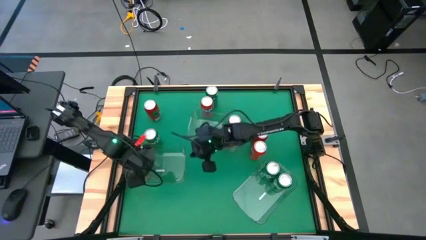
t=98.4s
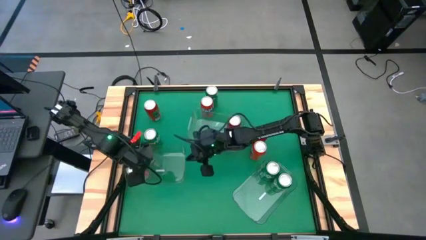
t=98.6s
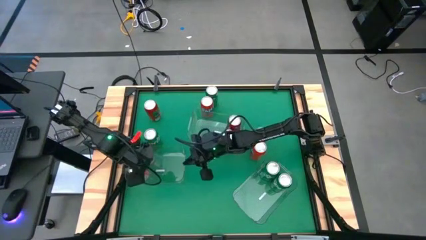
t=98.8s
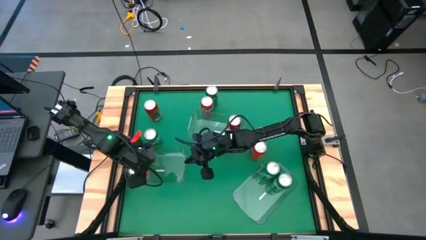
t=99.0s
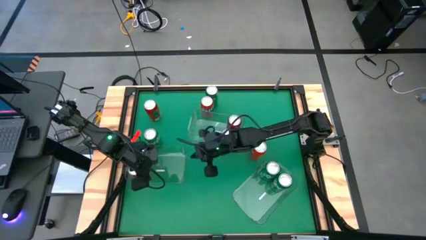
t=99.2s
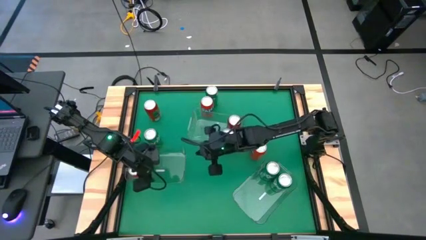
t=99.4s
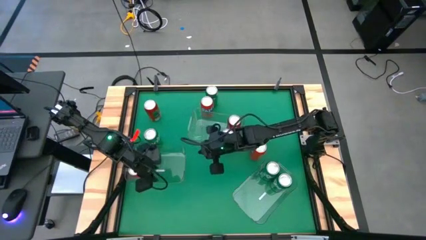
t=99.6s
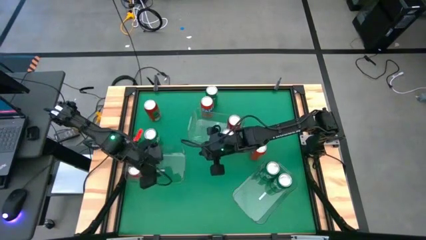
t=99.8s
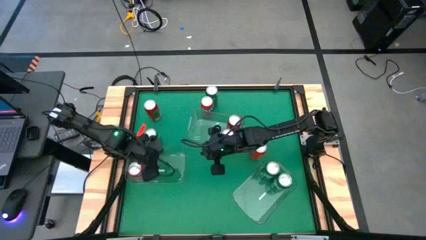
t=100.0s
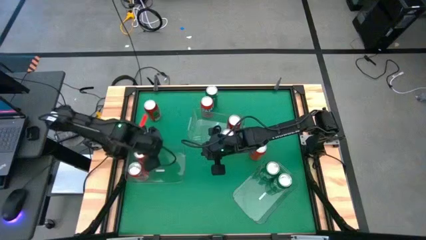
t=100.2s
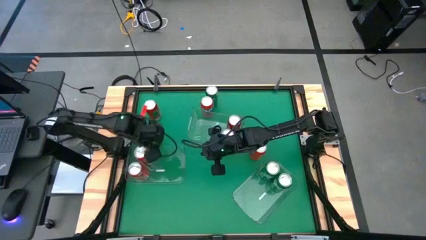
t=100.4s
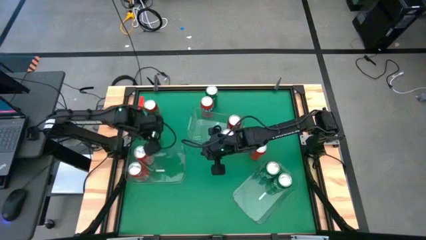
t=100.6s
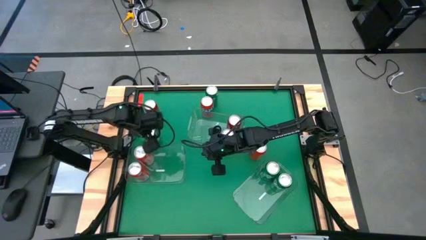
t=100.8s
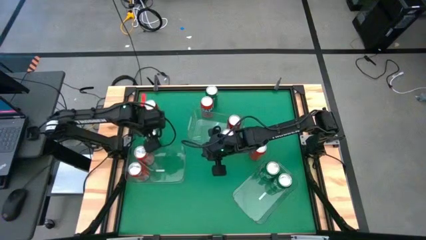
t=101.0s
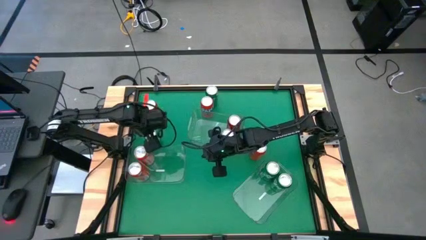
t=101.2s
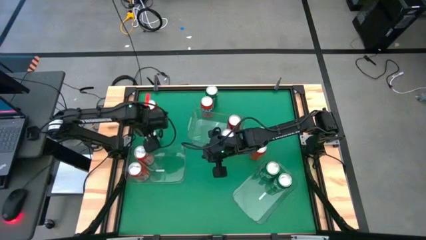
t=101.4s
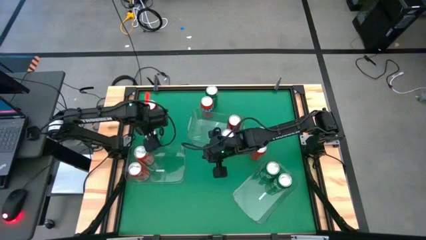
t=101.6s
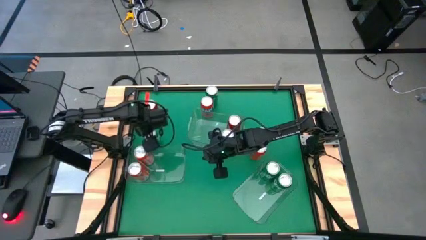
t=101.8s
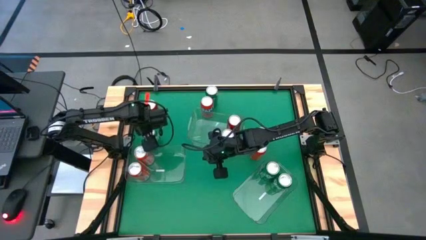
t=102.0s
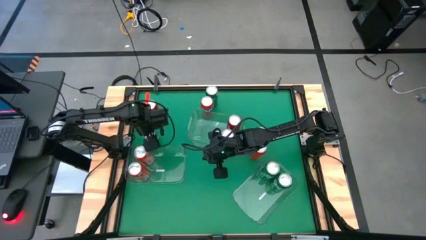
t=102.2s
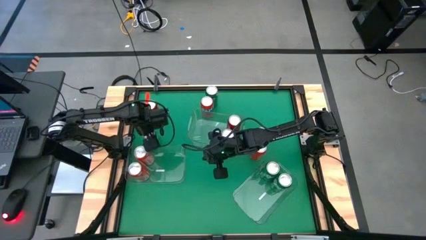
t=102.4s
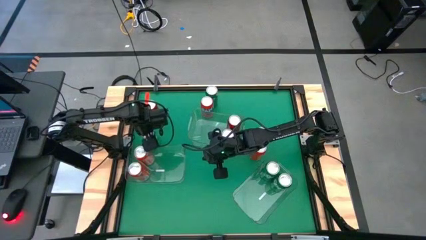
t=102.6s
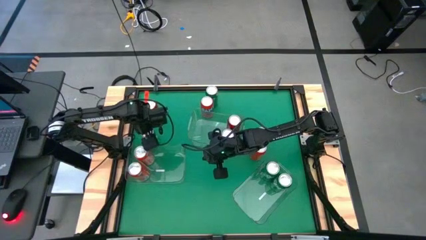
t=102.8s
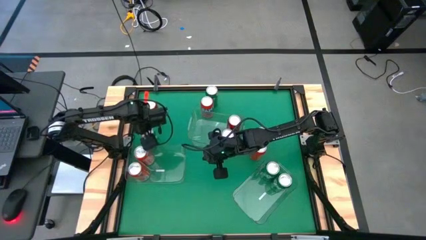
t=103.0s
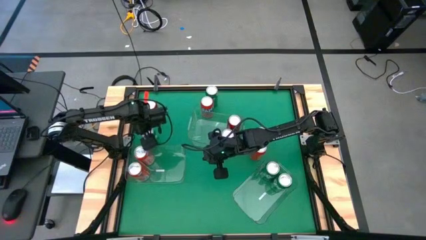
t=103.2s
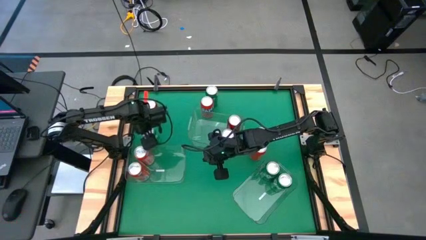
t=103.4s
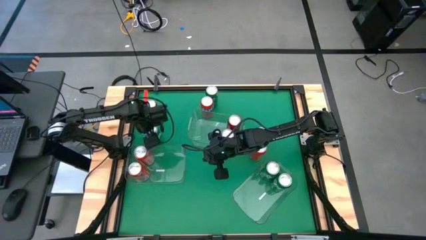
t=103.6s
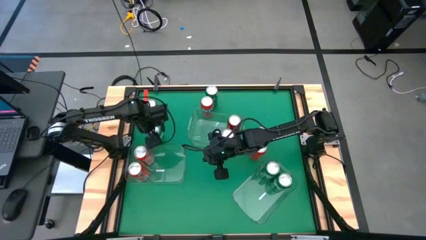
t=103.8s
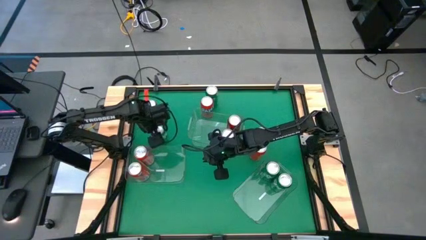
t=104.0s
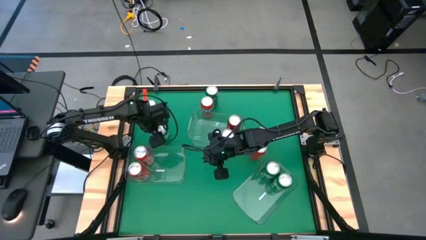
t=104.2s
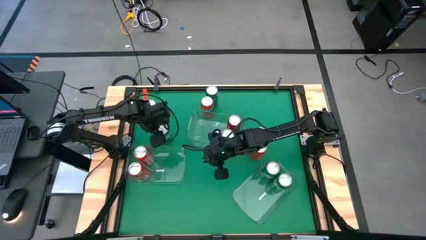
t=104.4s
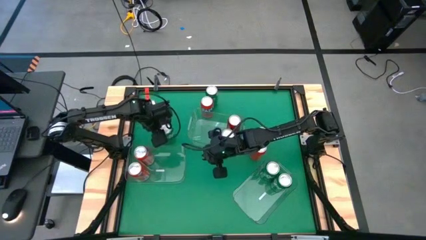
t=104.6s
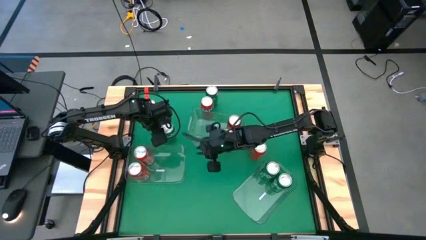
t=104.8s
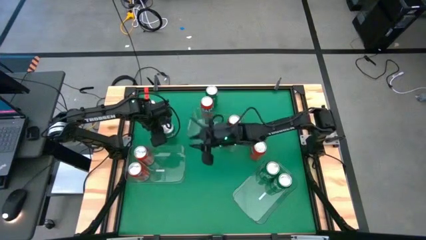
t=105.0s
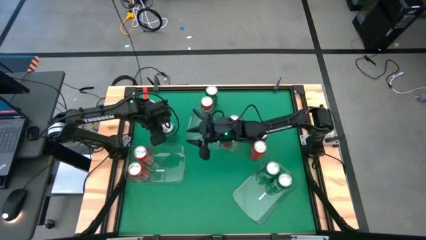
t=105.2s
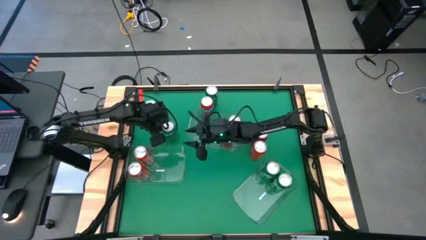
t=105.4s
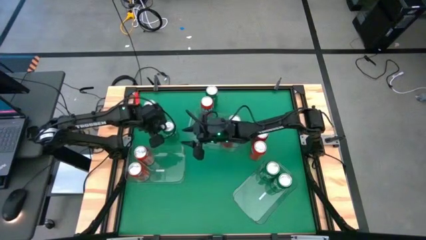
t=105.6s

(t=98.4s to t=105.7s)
Task: Sort soda cans
Put the bottom green soda can into the bottom right transparent bin

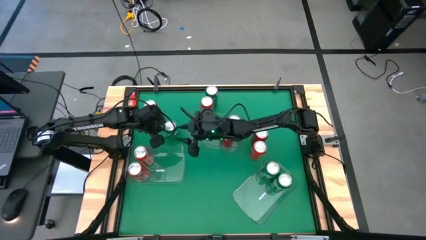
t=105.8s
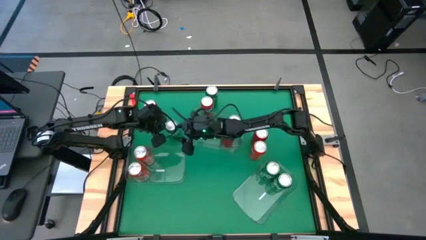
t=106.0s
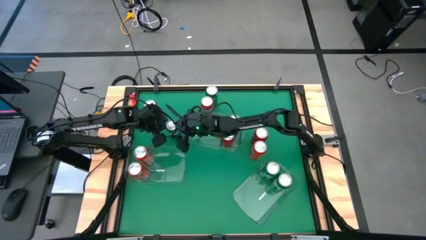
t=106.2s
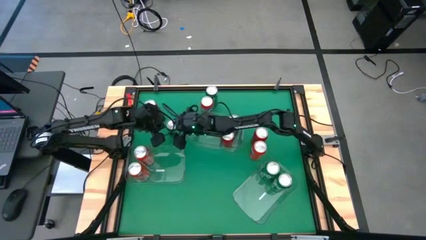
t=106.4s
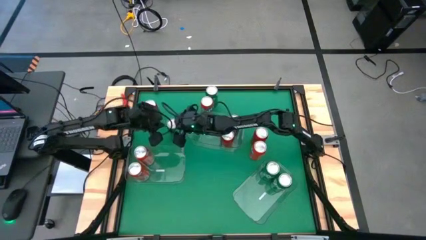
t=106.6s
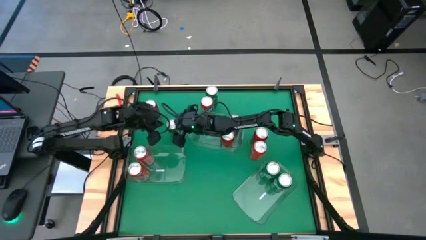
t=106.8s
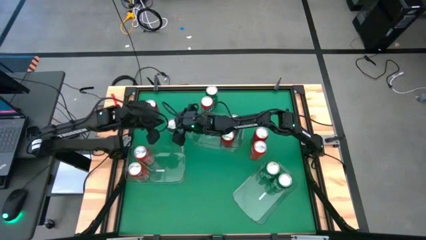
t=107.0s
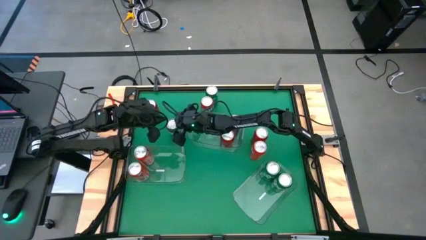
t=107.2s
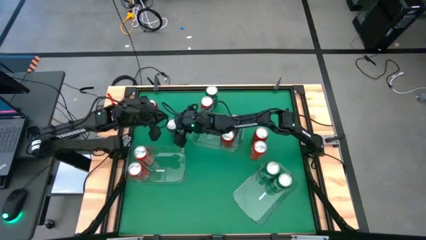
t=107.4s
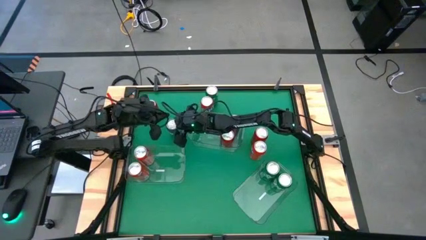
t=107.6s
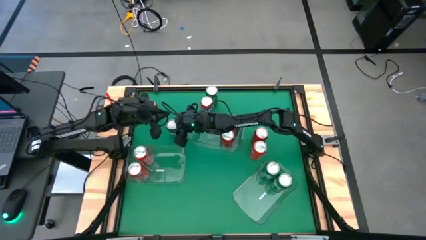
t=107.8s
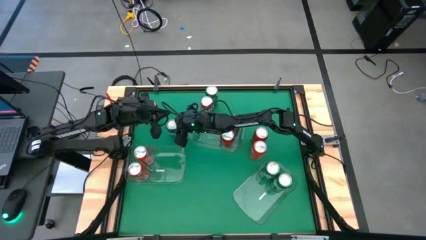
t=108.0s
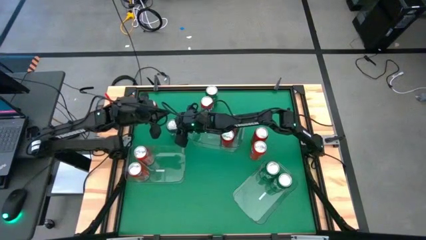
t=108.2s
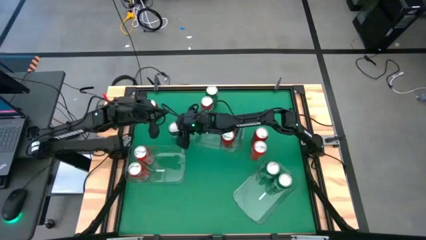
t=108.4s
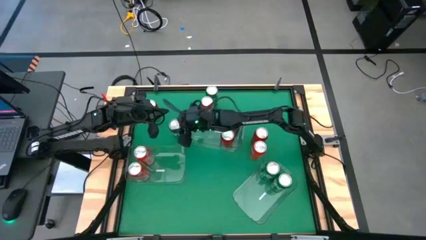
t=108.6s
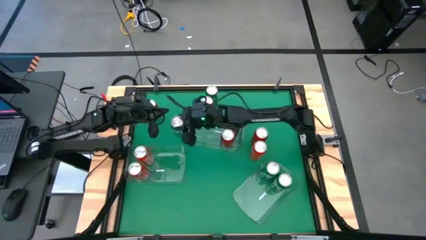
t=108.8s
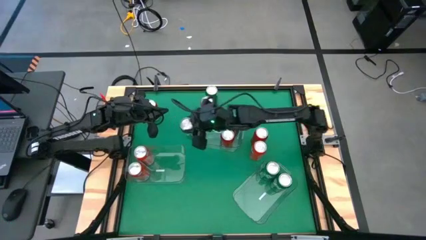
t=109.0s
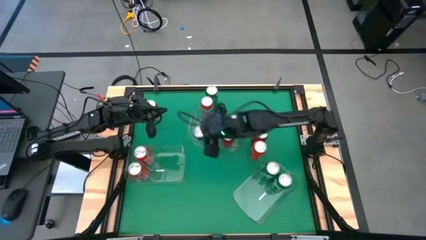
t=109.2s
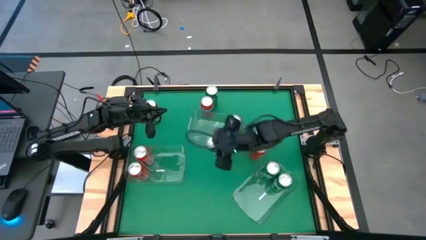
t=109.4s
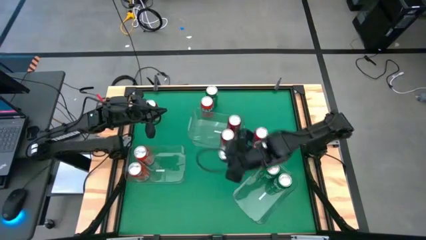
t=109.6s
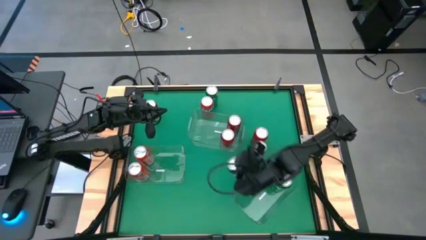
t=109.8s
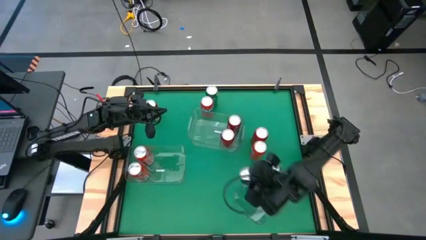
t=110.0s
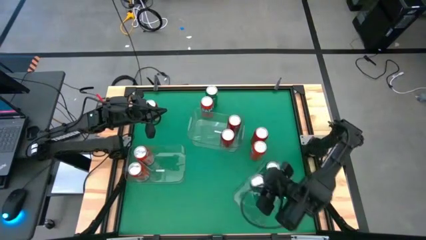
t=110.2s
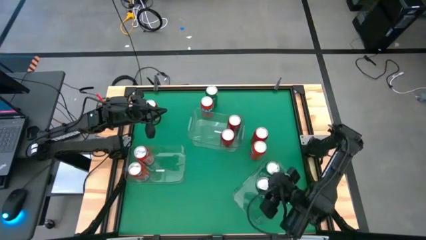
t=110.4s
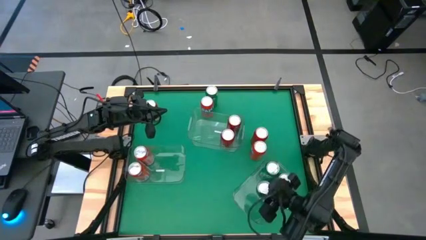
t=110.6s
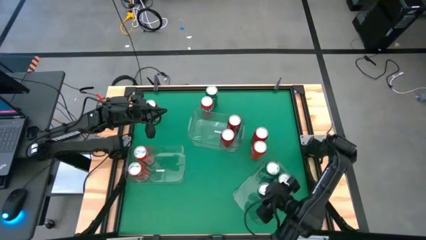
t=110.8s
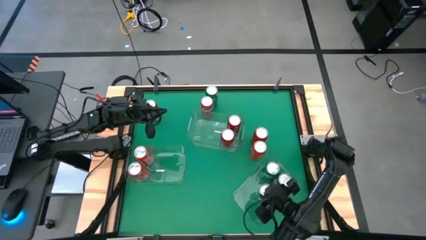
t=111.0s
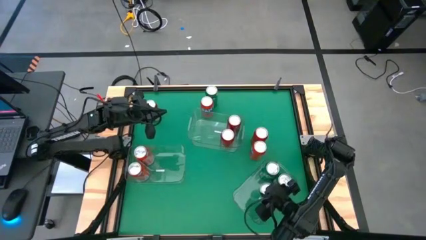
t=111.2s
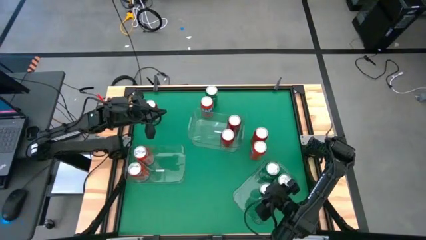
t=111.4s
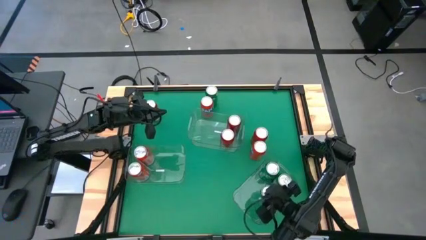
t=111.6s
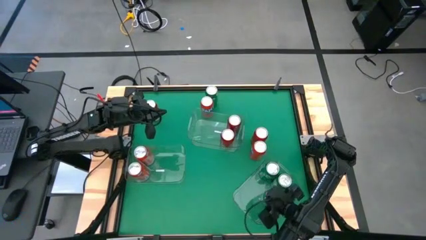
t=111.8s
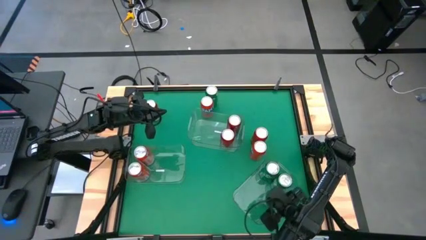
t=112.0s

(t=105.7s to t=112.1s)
Put the bottom green soda can into the bottom right transparent bin

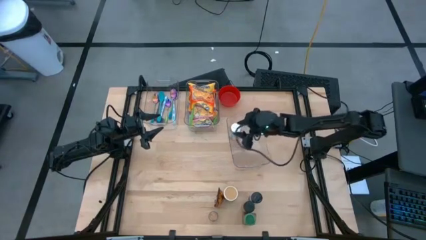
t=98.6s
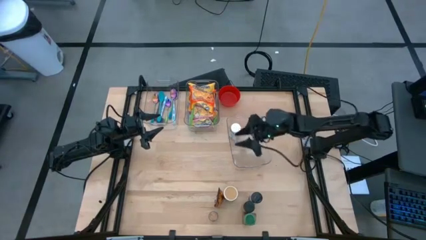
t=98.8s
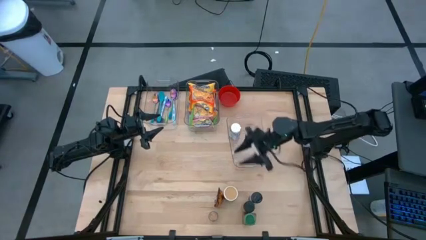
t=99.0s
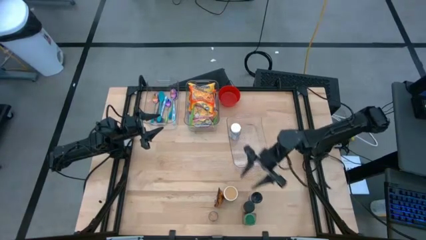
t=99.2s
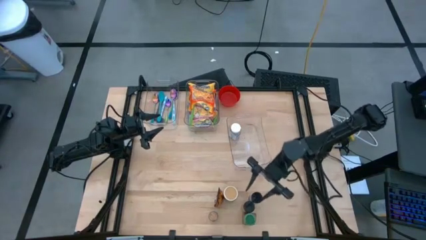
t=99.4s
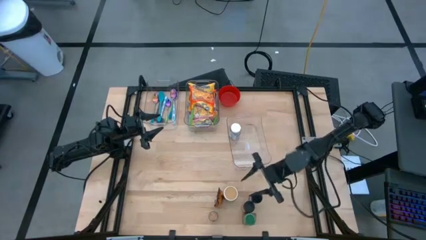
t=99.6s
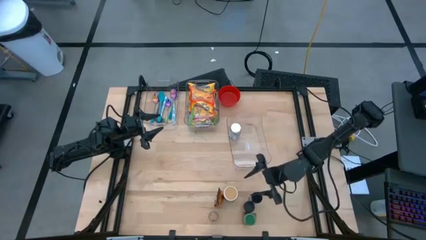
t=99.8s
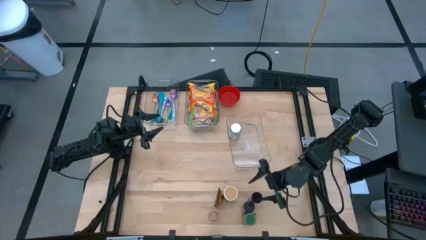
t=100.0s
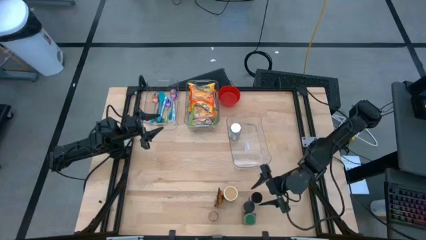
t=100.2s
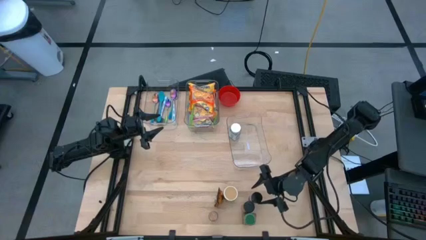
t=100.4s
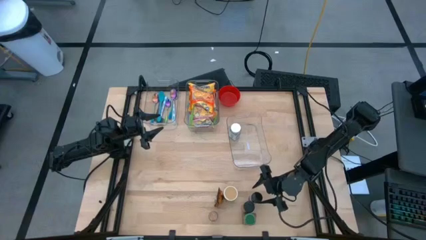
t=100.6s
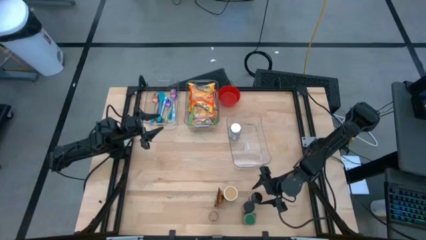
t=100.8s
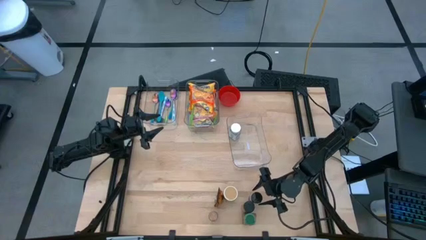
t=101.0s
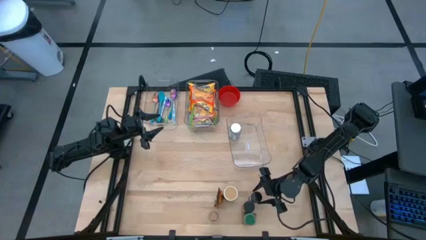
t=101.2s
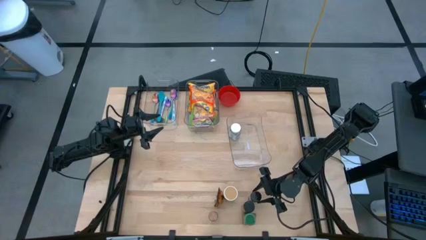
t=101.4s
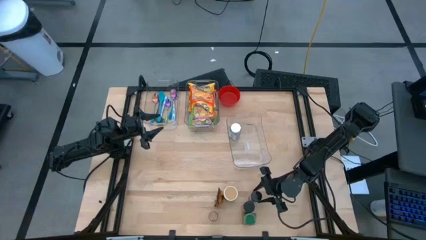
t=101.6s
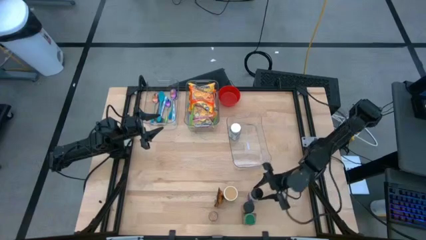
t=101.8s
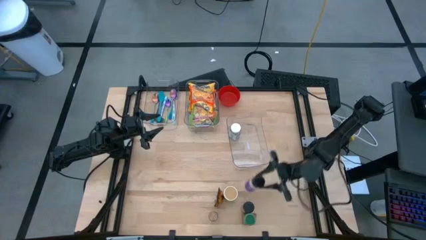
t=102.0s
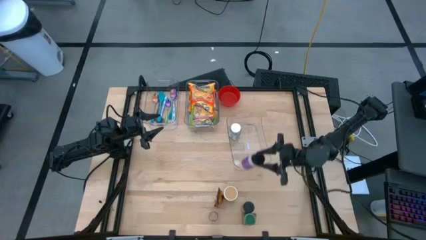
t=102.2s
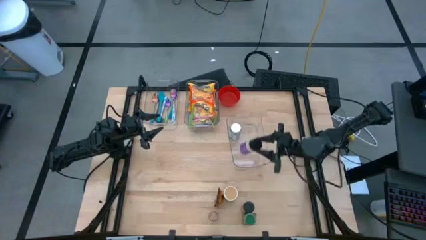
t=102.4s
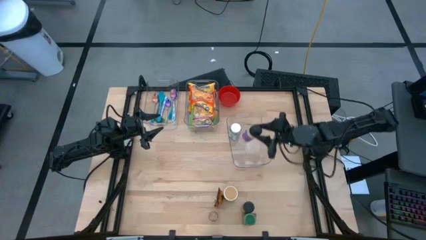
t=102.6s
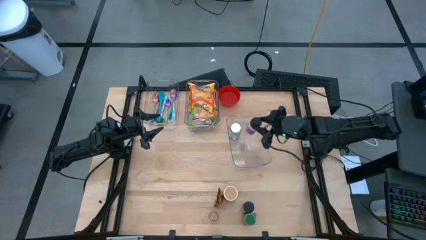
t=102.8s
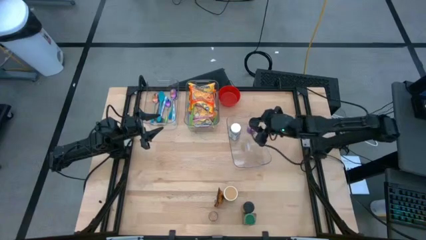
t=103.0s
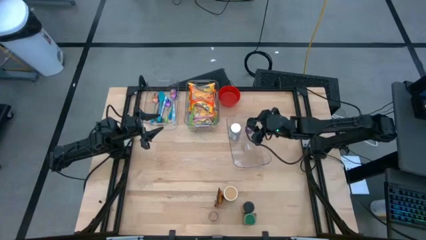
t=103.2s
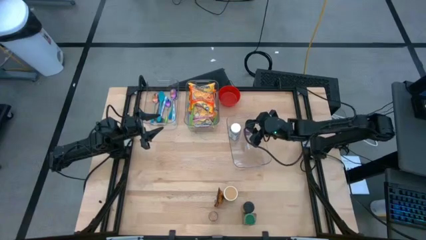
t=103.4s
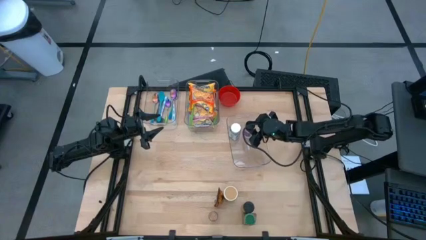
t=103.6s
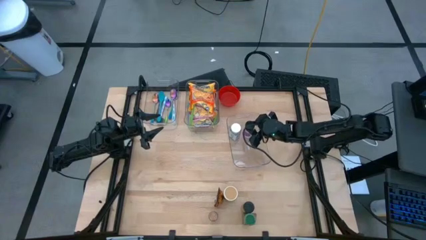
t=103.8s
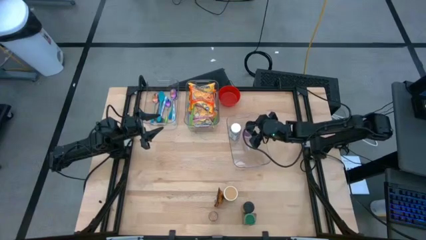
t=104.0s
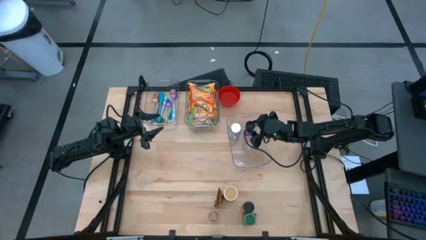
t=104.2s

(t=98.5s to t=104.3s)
Task: Pick & Place Food Item
Put the black and purple seasoning bottle into the bottom right transparent bin
